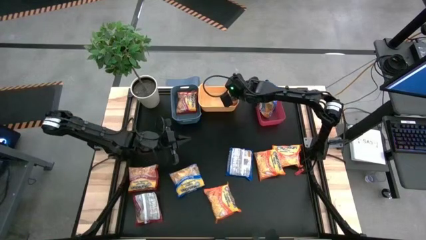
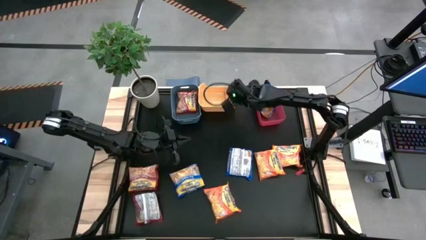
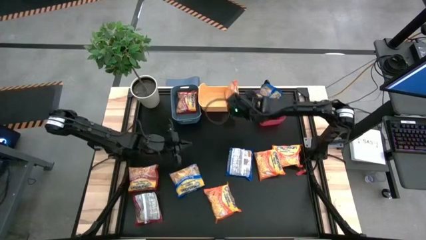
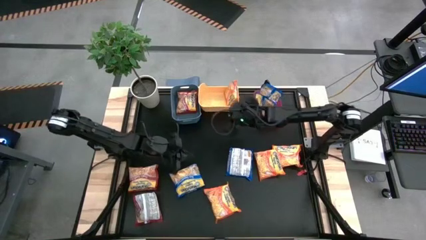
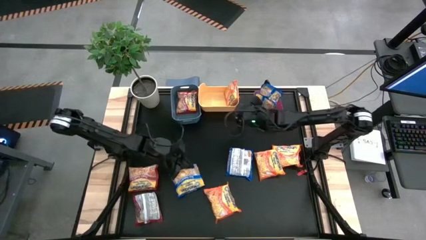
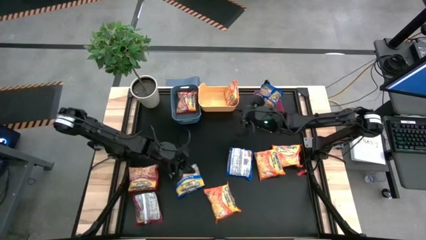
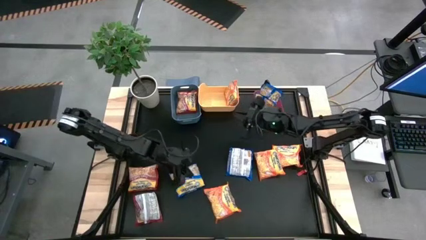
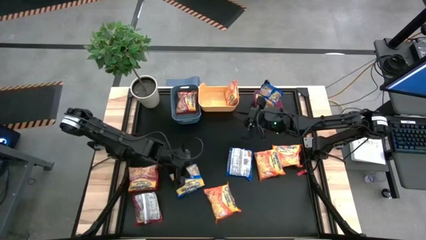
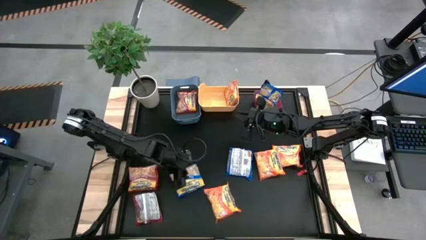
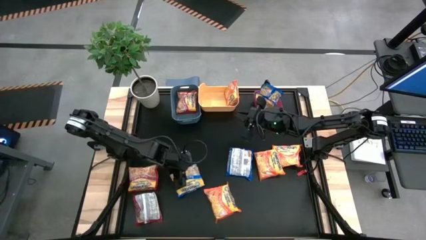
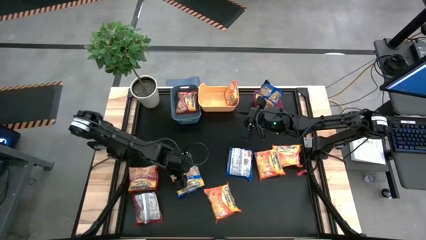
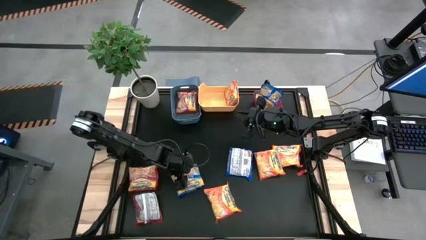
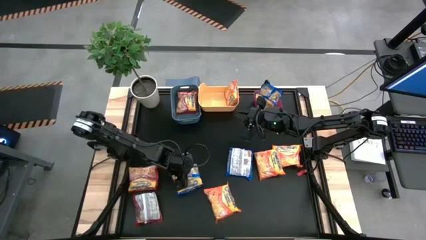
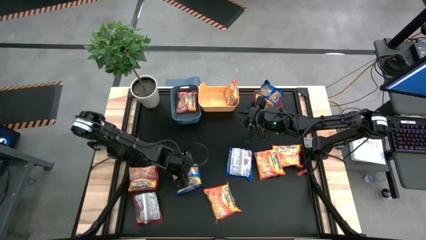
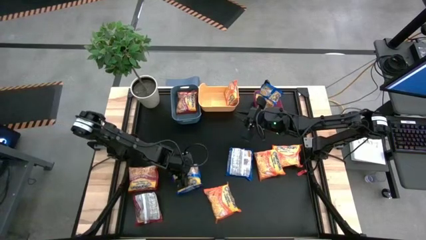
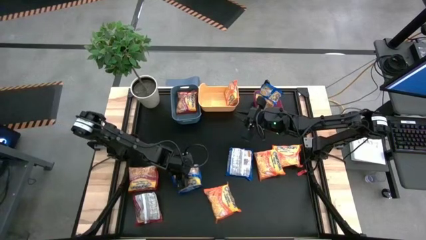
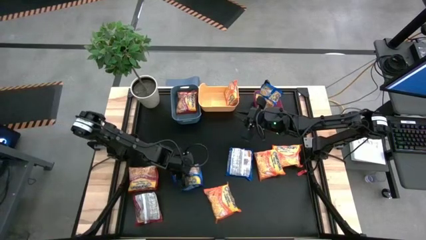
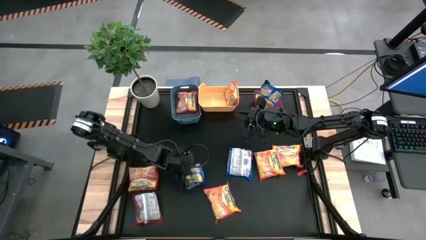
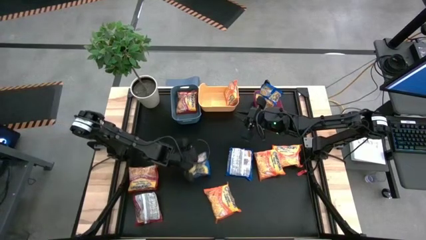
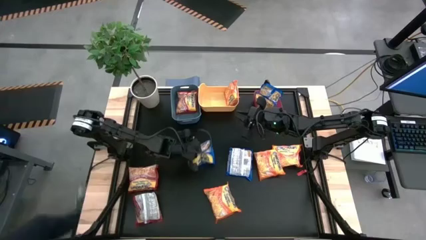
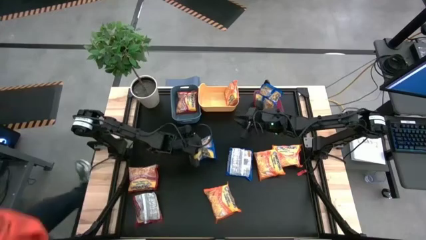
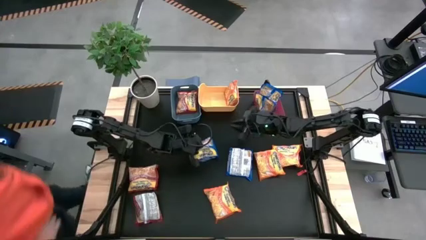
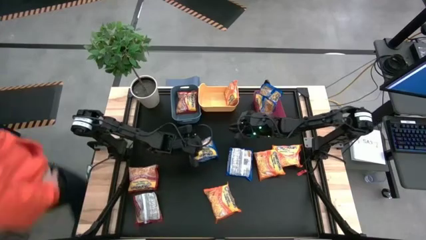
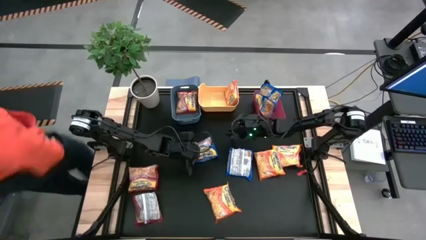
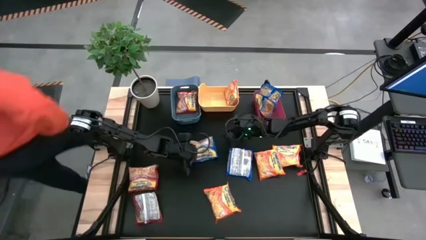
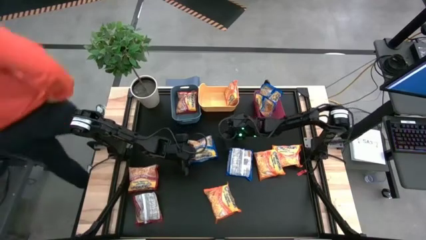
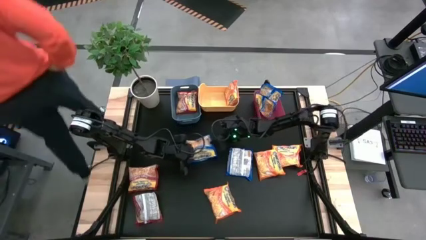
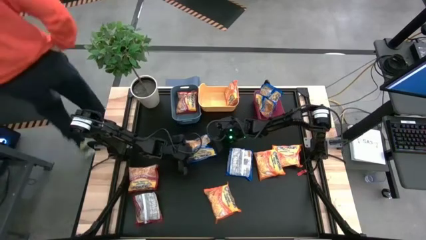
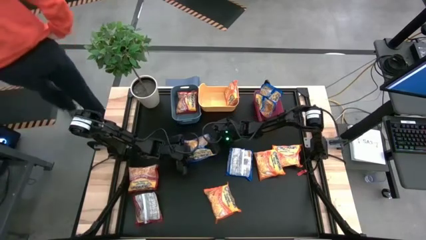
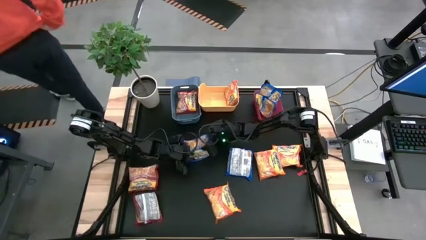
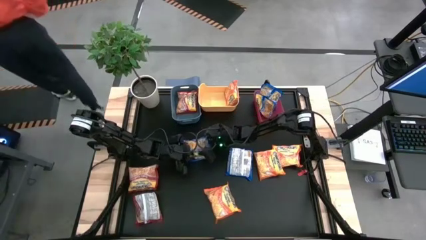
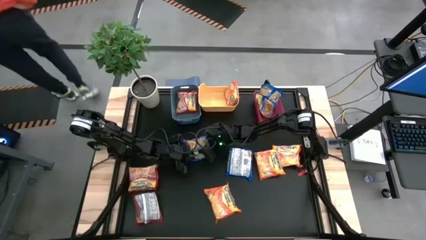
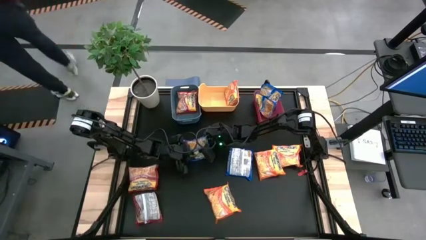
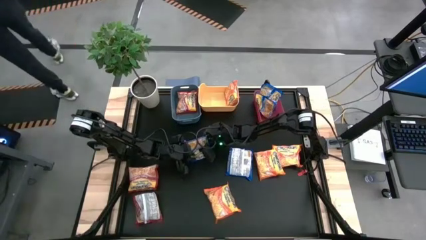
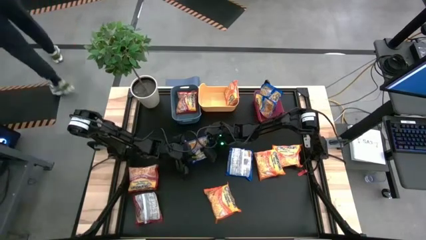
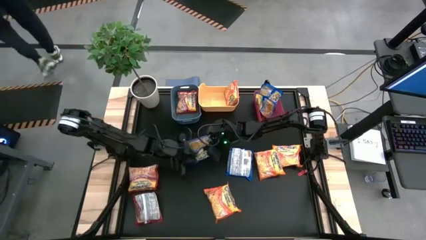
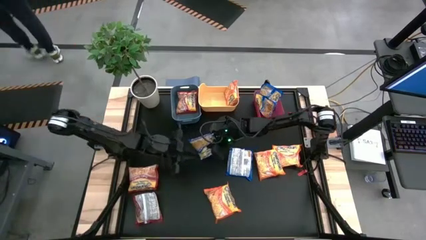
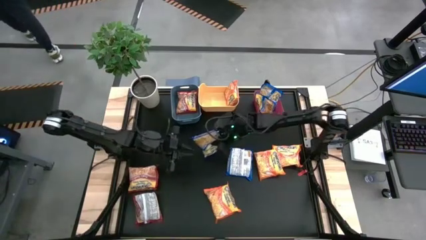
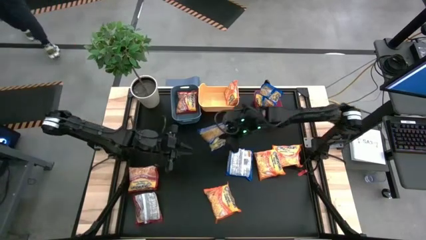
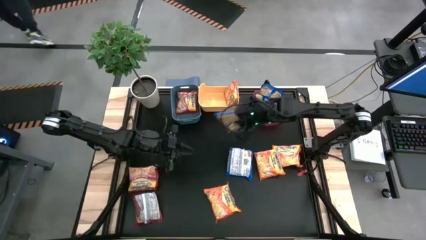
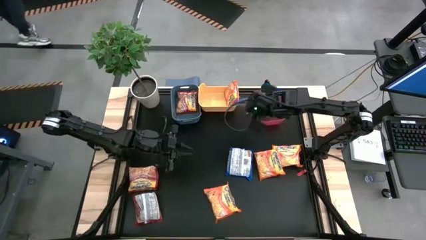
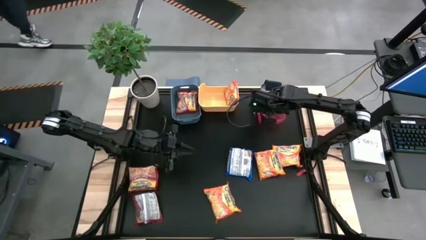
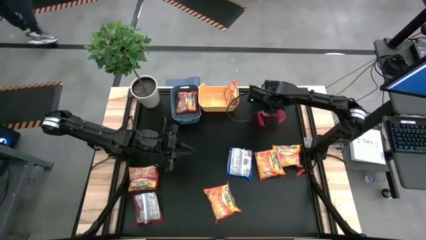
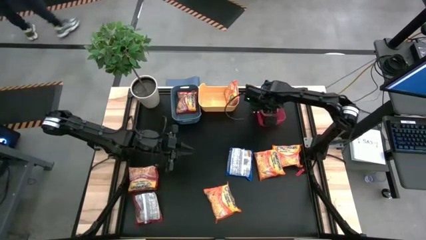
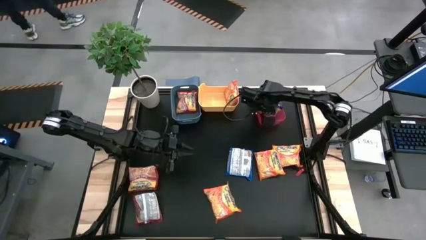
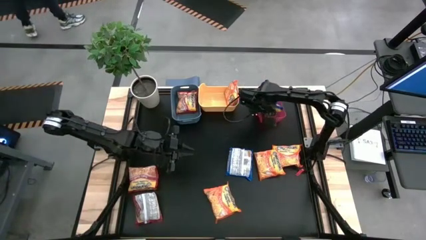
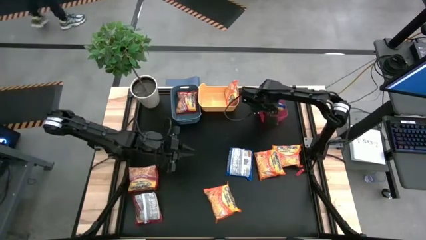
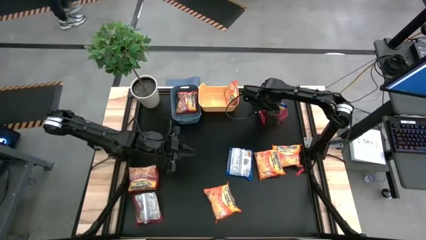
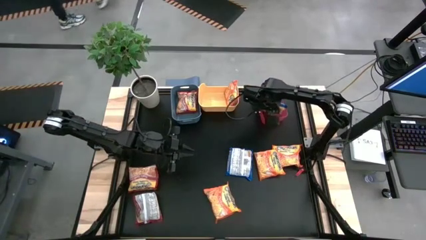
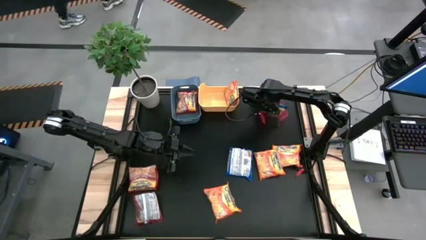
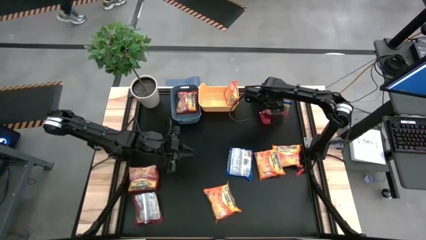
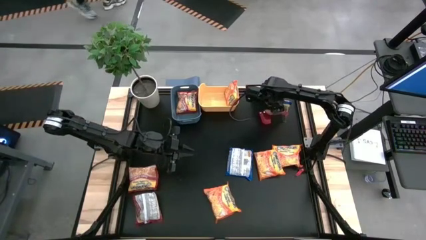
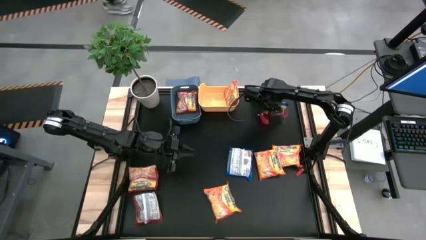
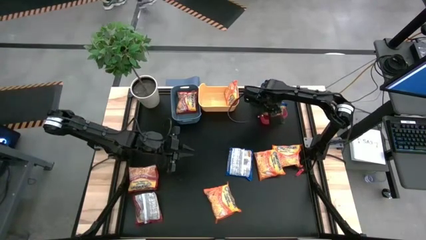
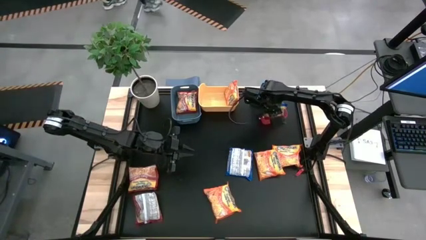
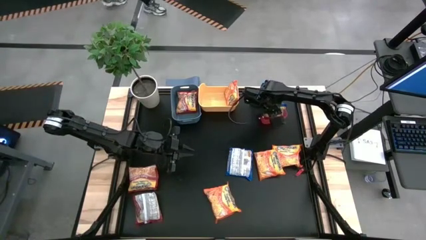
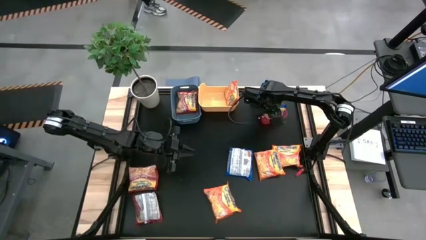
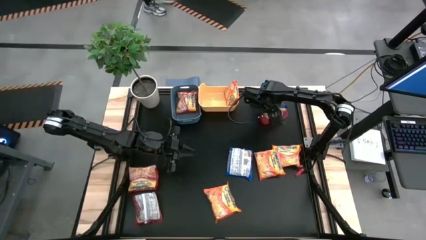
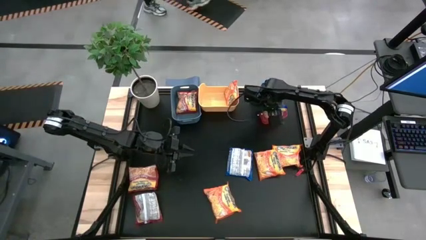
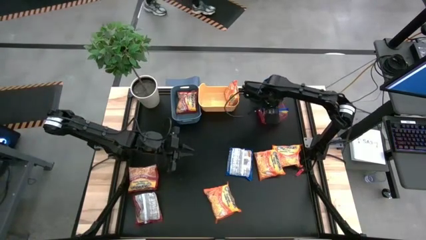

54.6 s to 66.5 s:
Task: Sort Maruchan noodles
Put the blue noodle pack into the red bin

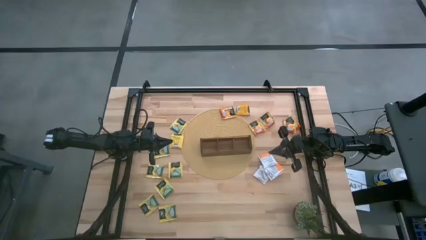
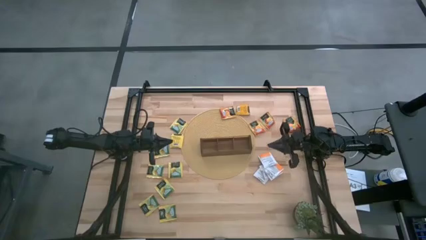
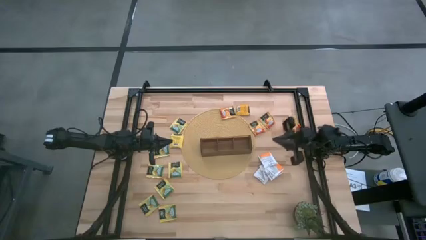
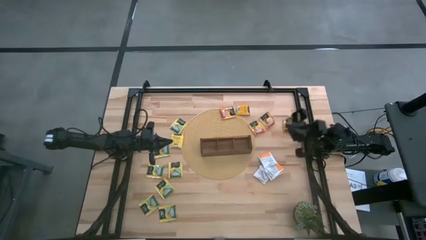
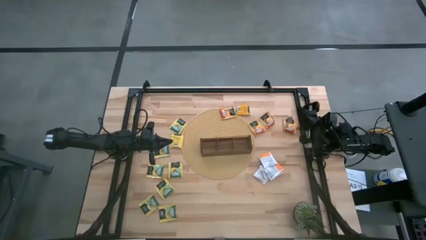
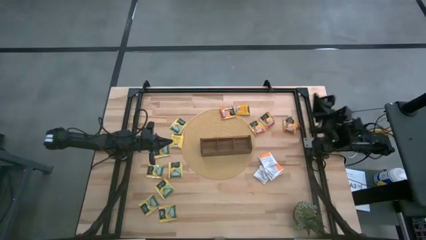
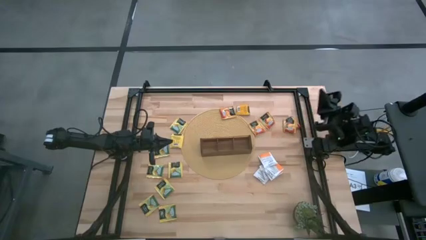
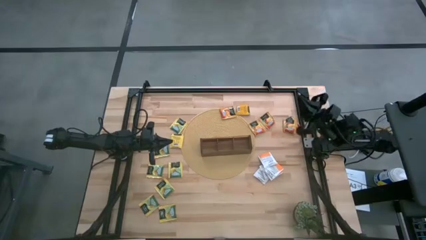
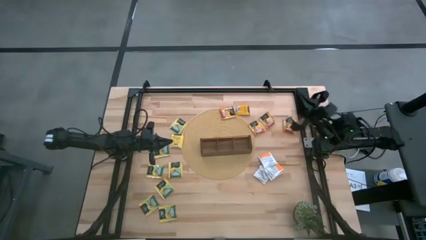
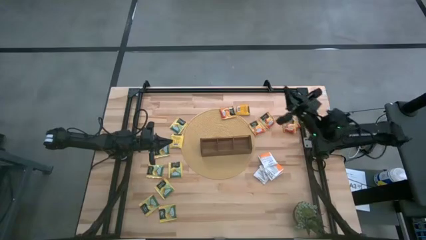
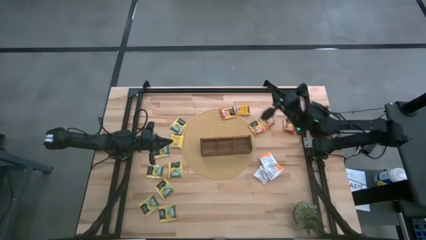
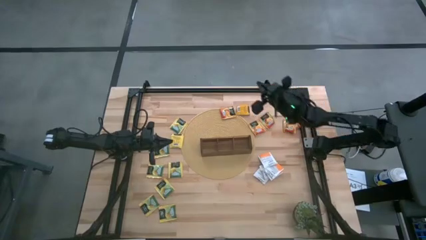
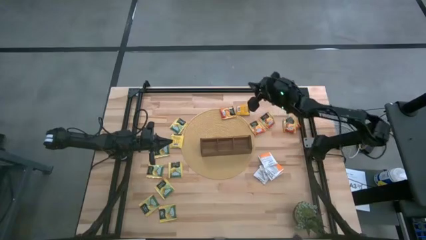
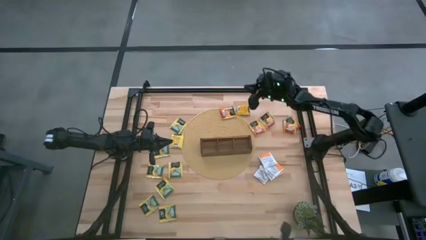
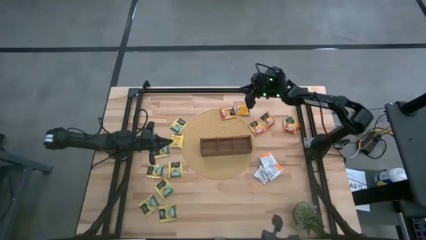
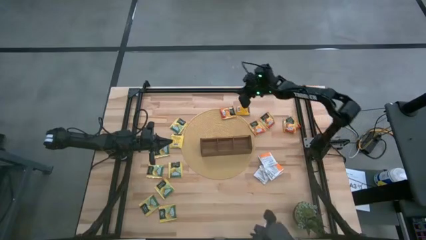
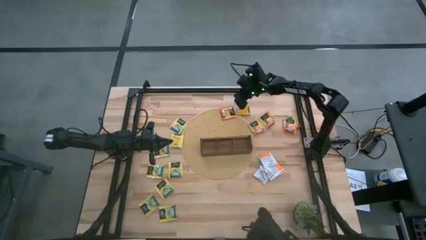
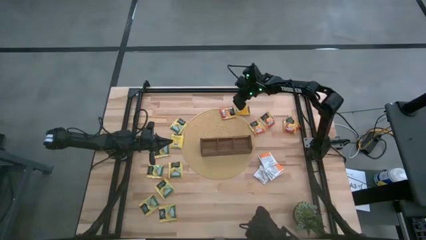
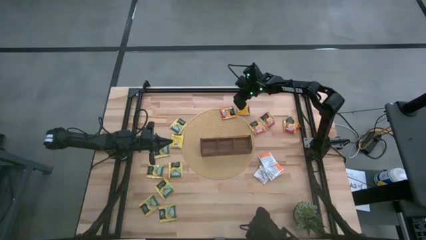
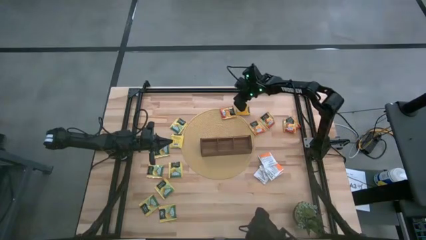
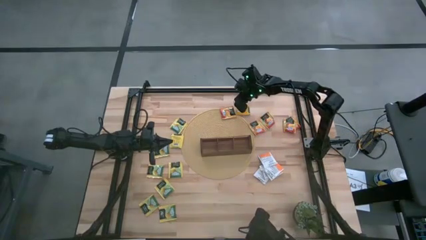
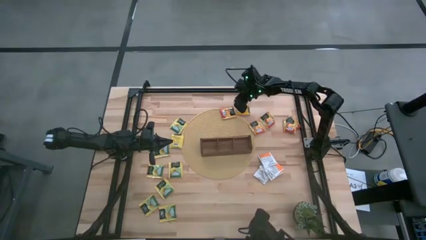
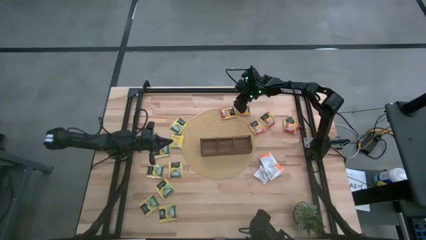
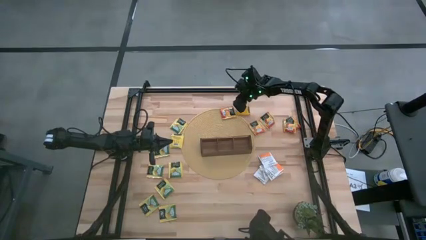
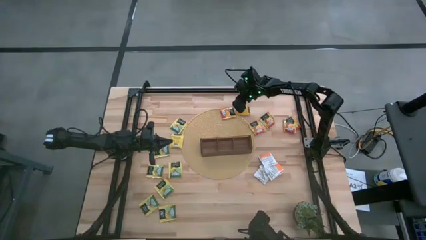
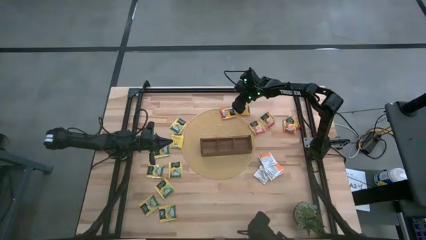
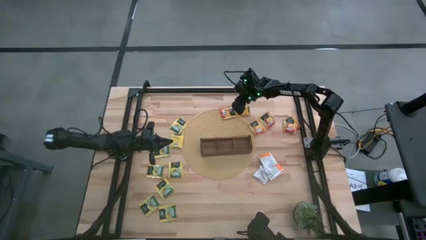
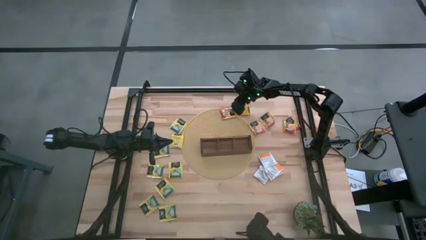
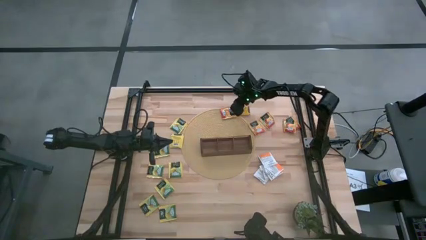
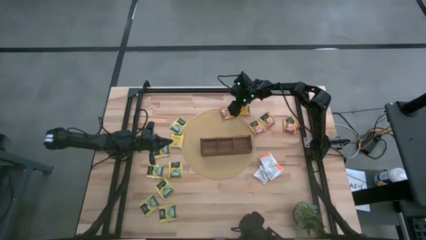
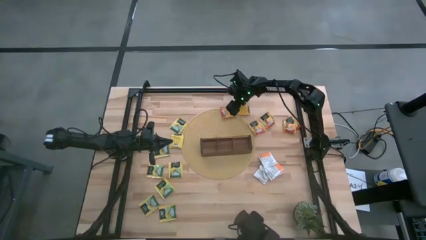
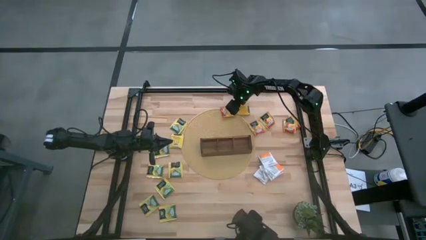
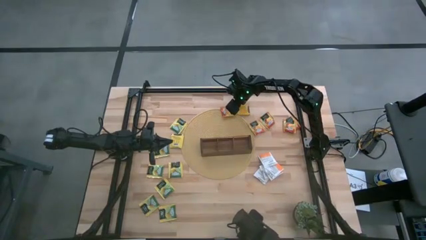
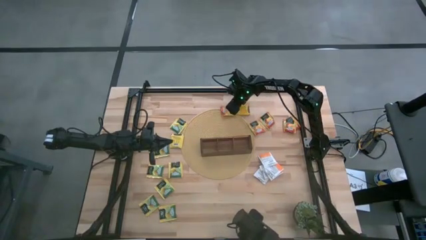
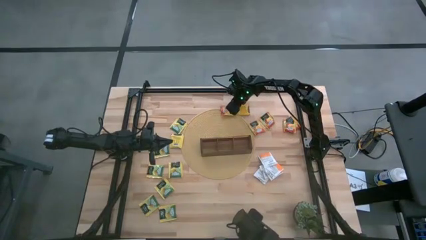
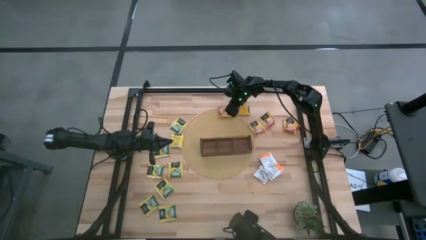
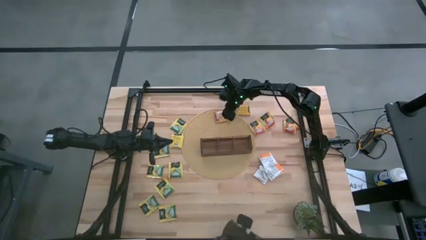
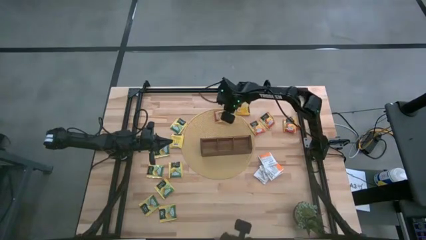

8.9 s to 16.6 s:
Task: Pick & Place Tea
Put the orange tea bag into the right section of the wooden organizer
